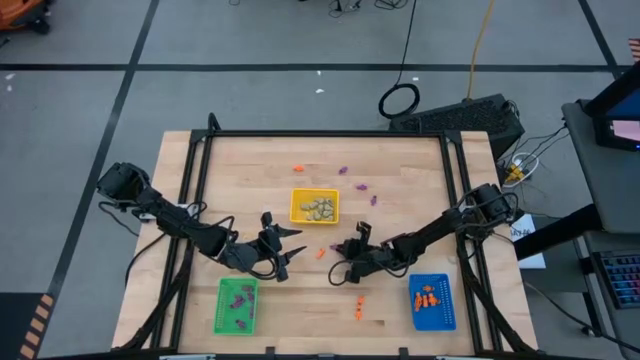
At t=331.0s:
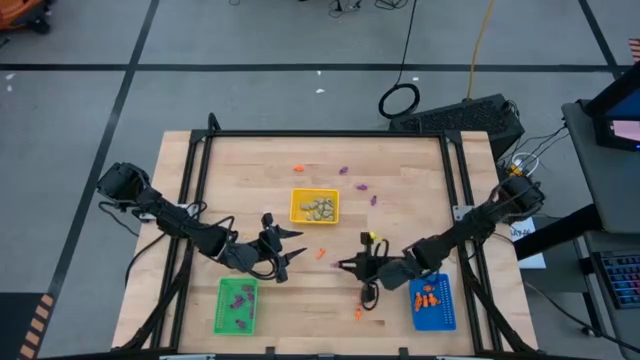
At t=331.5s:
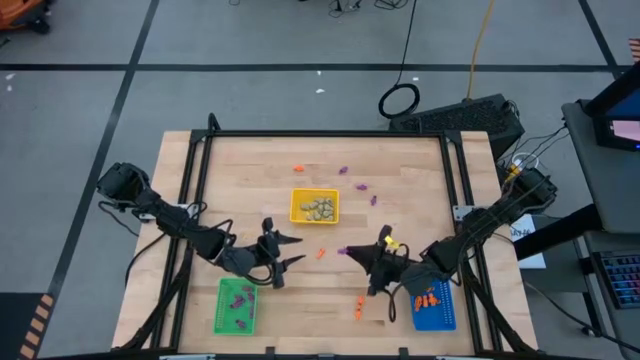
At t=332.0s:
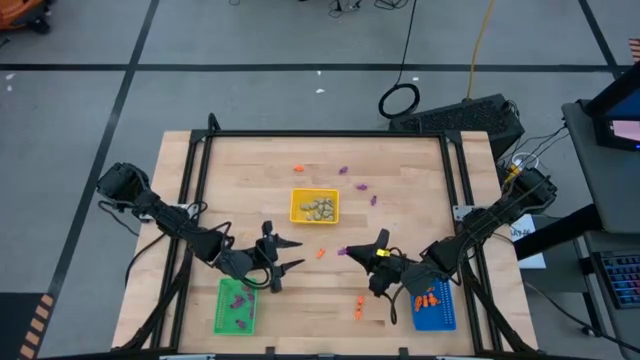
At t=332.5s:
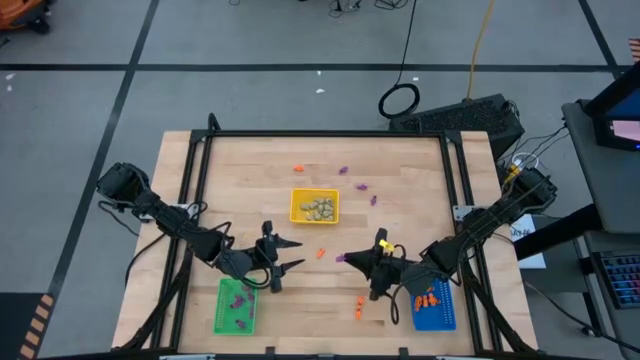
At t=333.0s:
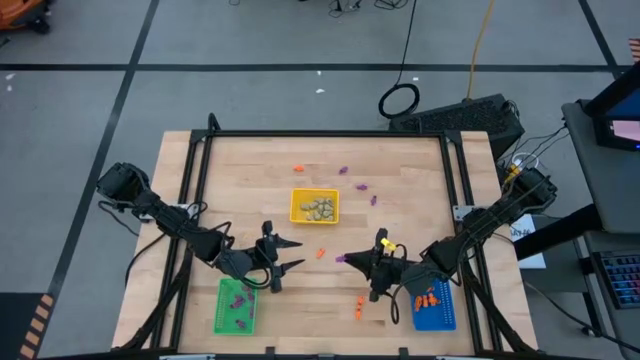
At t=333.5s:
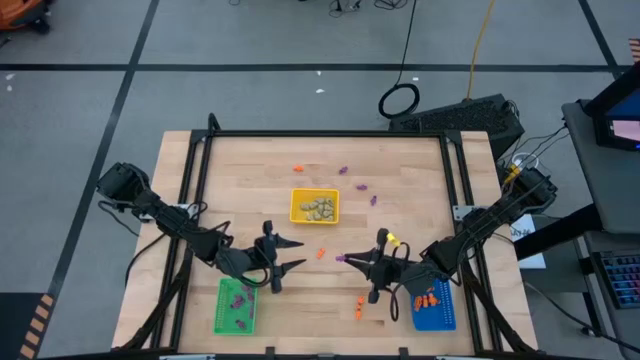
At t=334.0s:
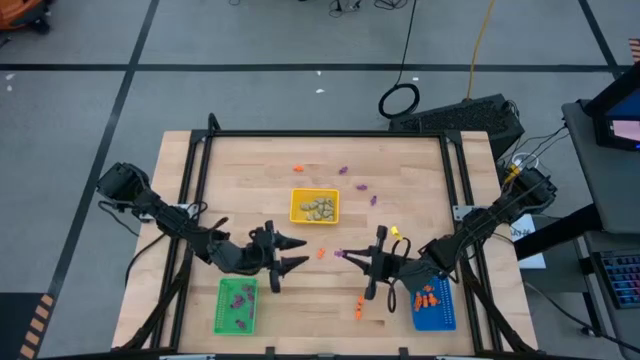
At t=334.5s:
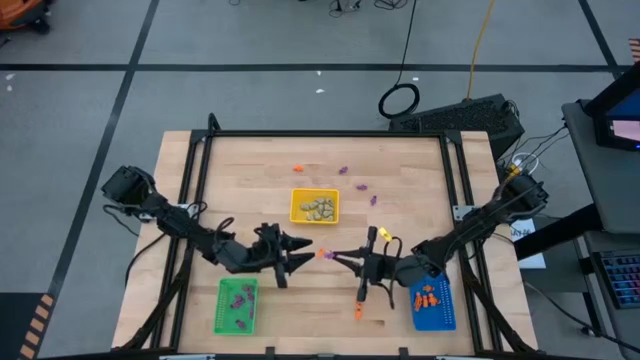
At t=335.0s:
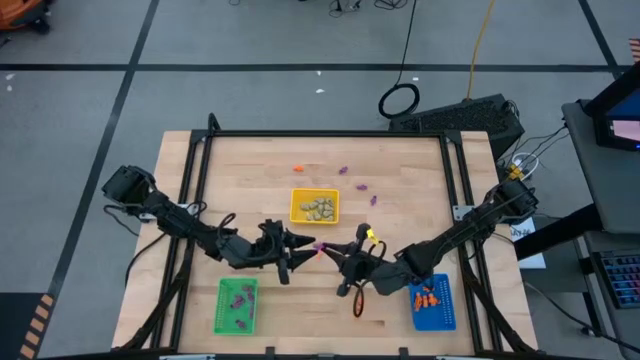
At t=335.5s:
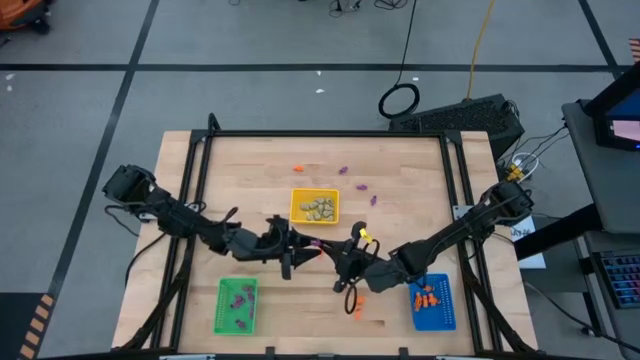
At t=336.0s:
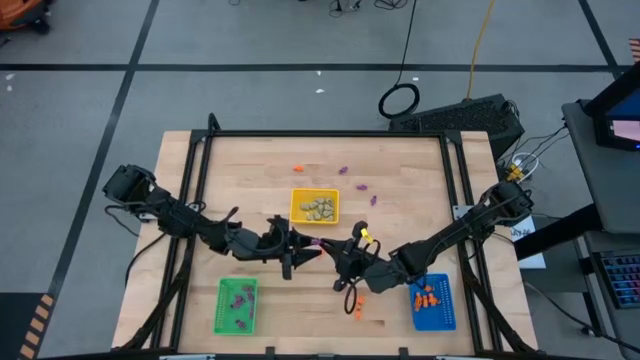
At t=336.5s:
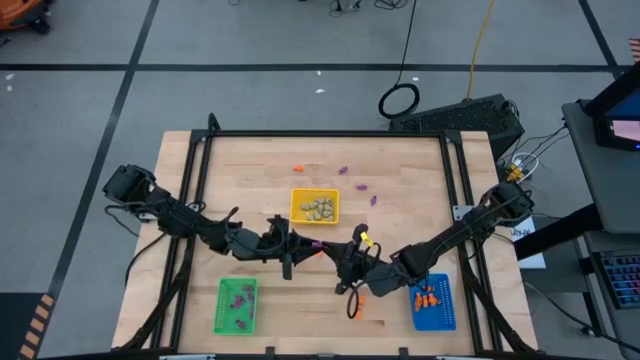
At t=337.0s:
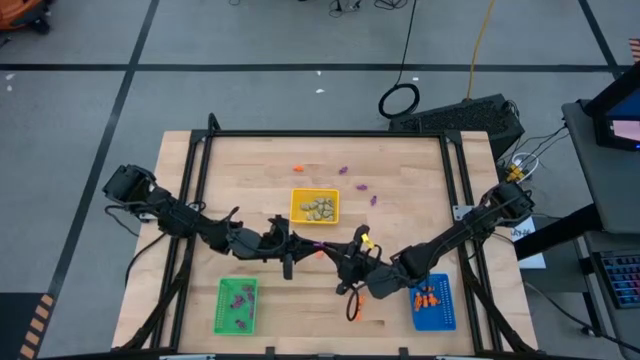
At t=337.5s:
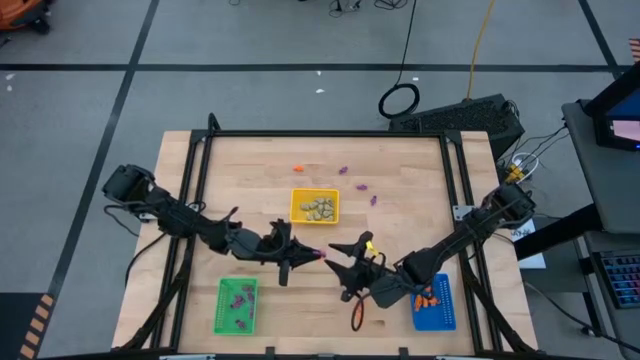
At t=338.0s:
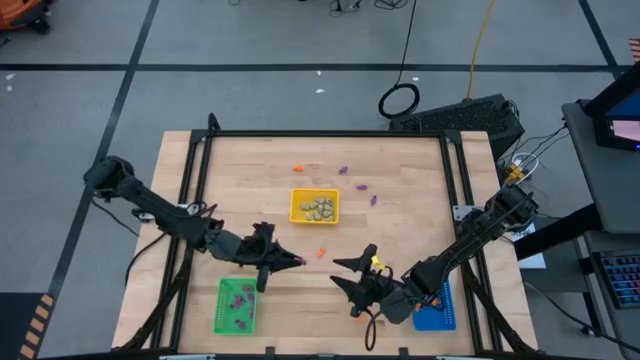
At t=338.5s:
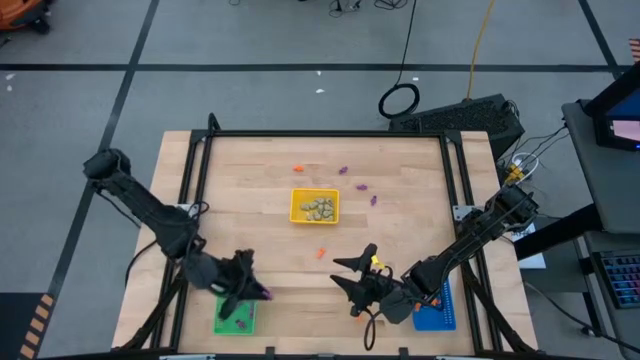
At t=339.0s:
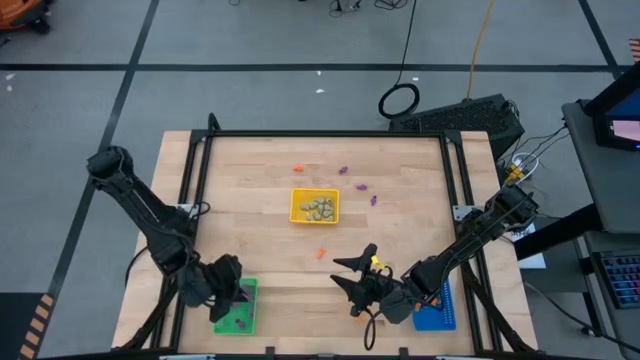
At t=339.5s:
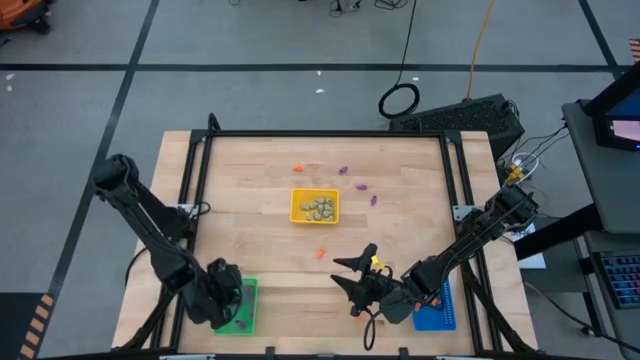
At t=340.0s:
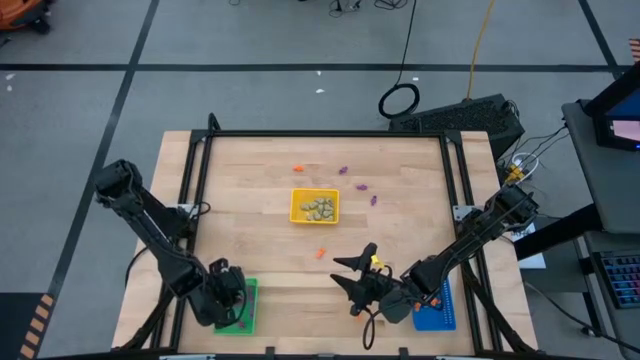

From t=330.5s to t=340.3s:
Task: Sort Halloween decoration
Put the purple skeleton toy in the green basket

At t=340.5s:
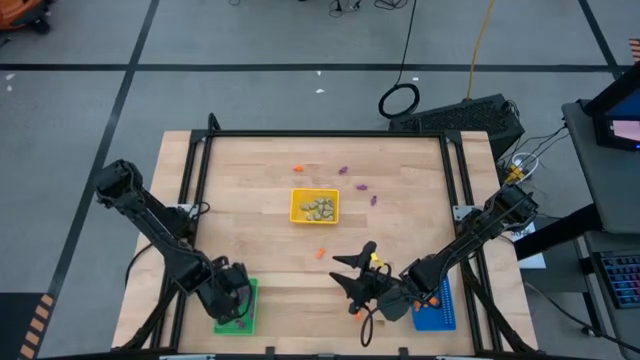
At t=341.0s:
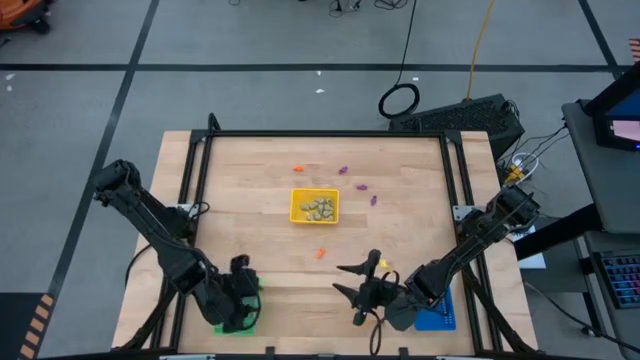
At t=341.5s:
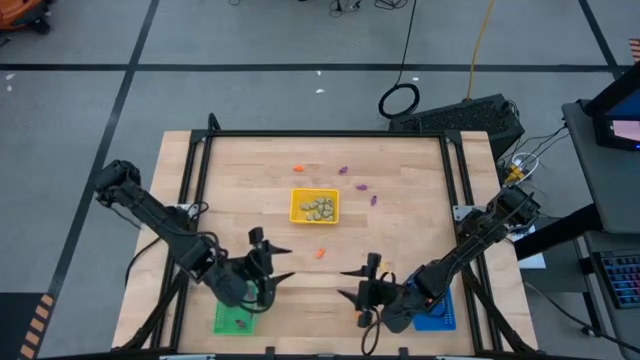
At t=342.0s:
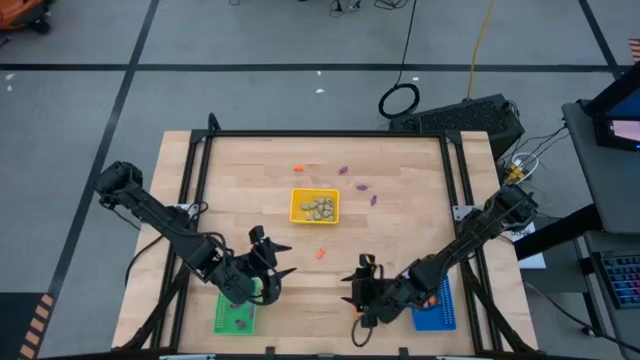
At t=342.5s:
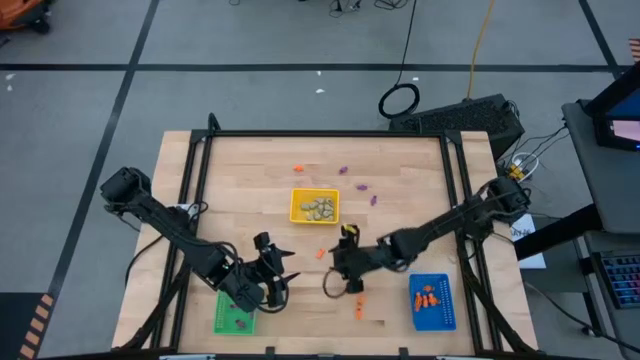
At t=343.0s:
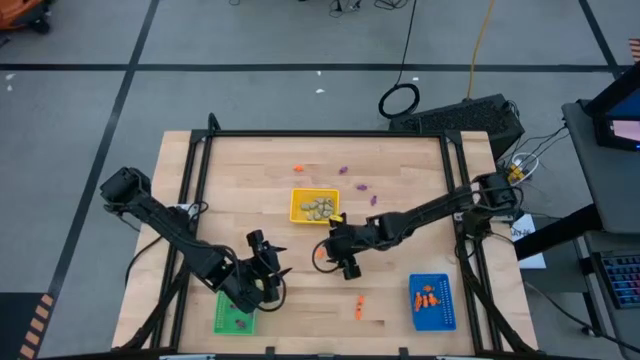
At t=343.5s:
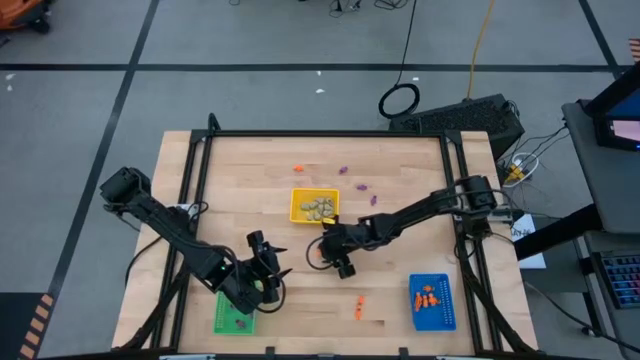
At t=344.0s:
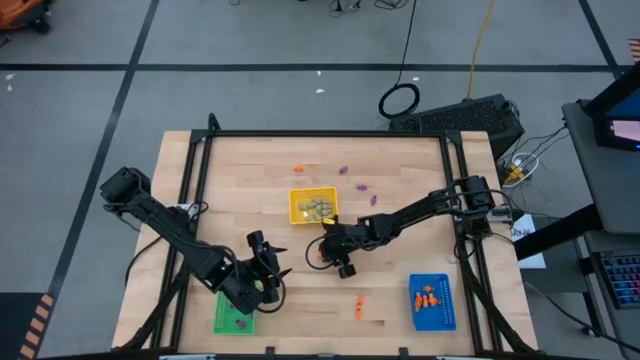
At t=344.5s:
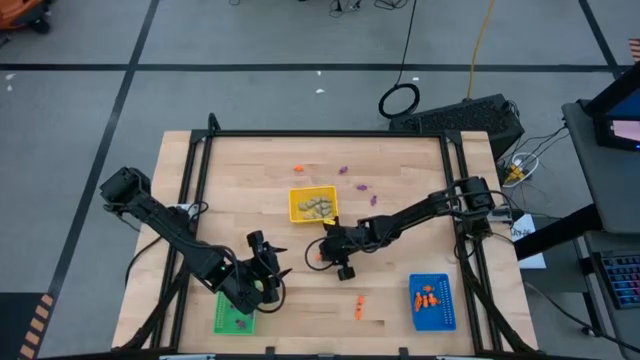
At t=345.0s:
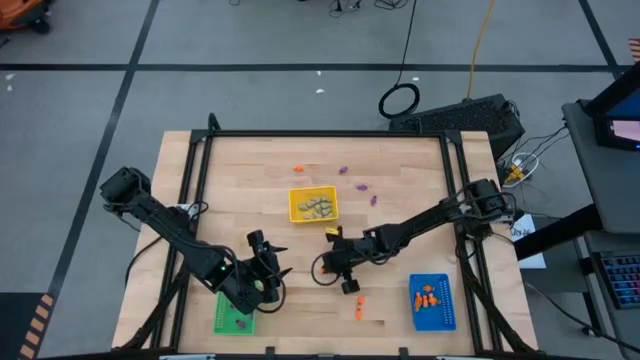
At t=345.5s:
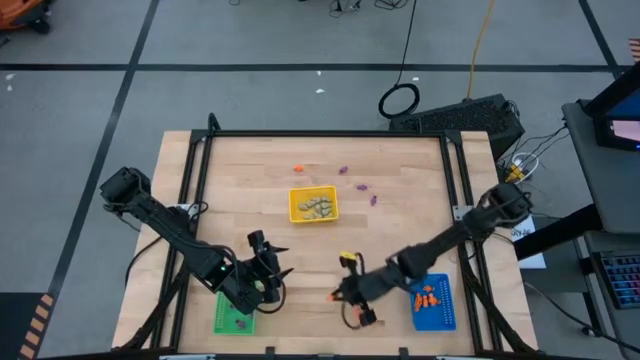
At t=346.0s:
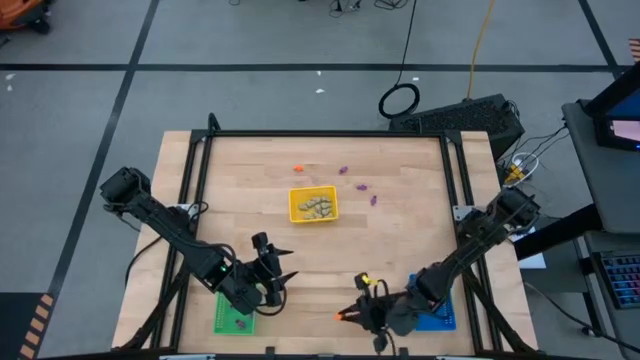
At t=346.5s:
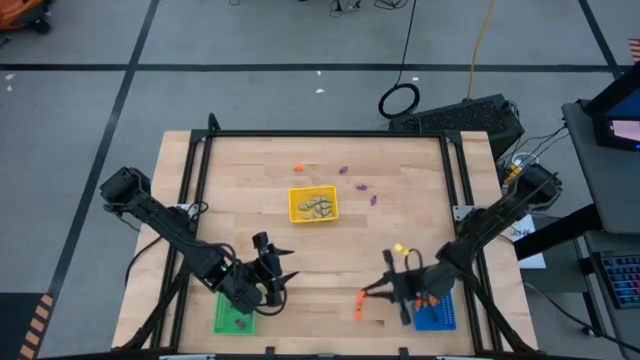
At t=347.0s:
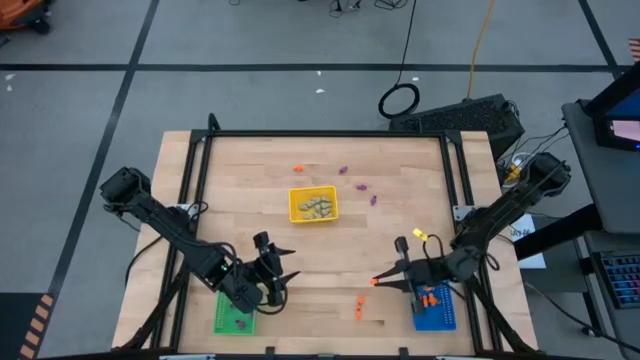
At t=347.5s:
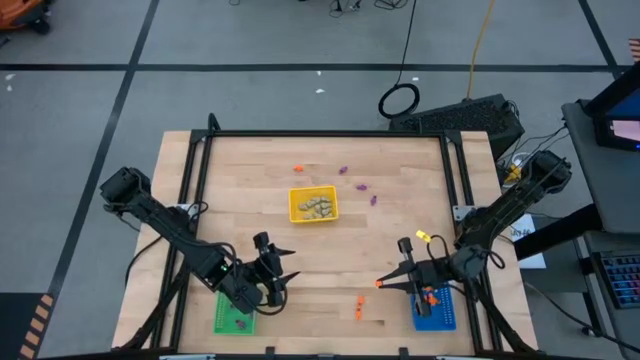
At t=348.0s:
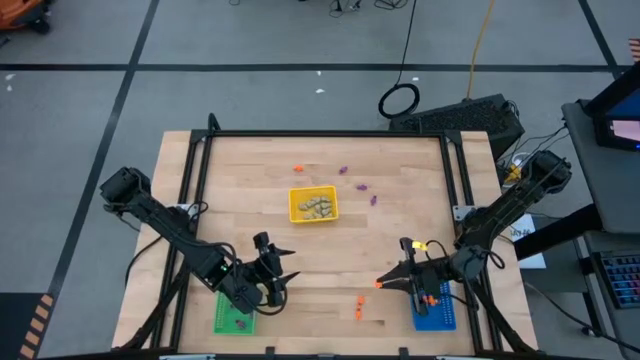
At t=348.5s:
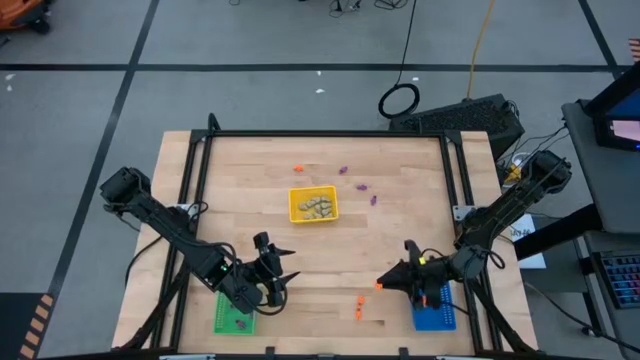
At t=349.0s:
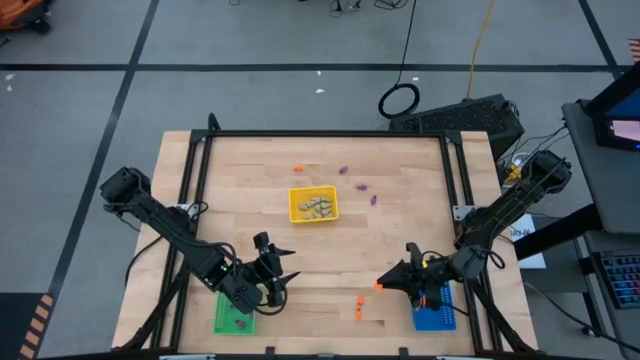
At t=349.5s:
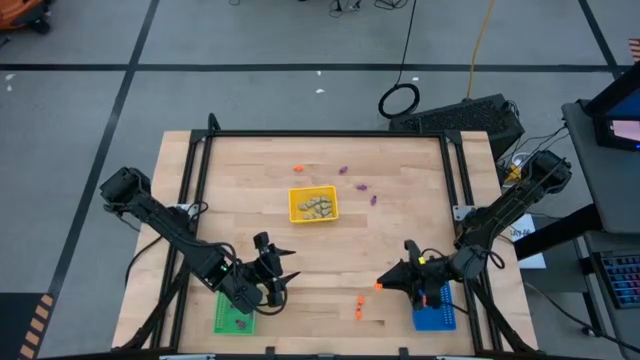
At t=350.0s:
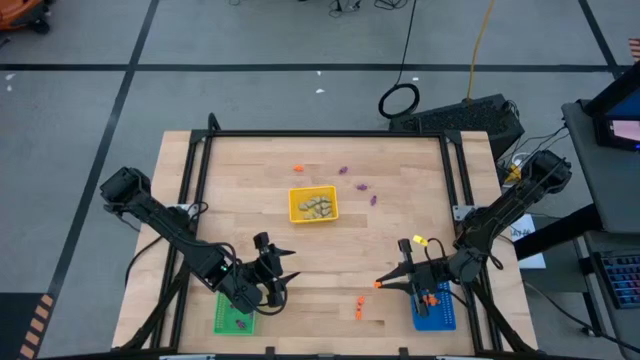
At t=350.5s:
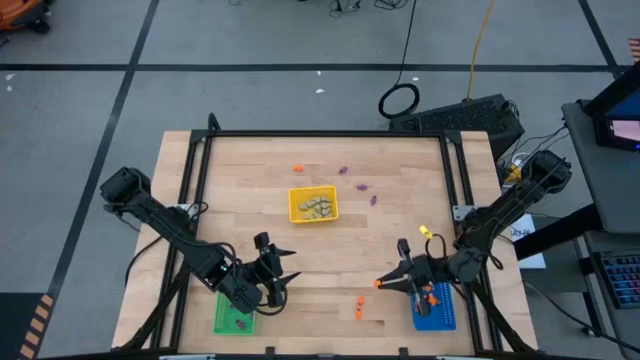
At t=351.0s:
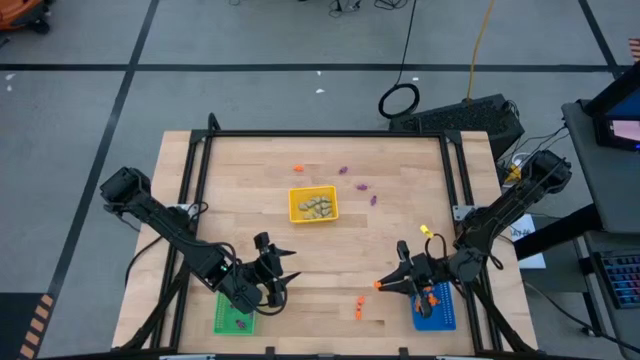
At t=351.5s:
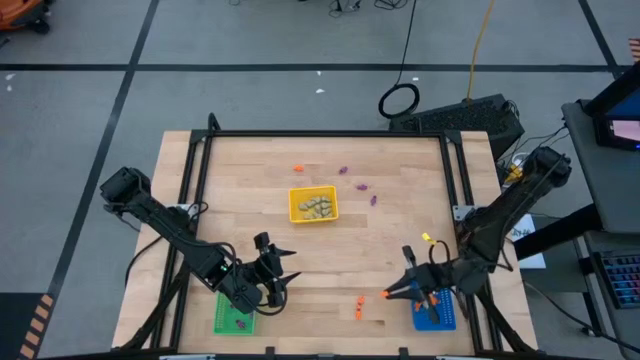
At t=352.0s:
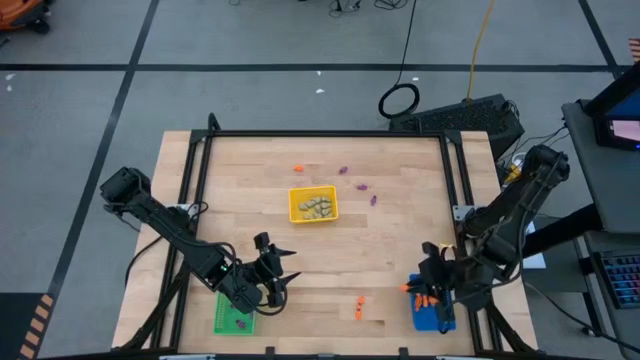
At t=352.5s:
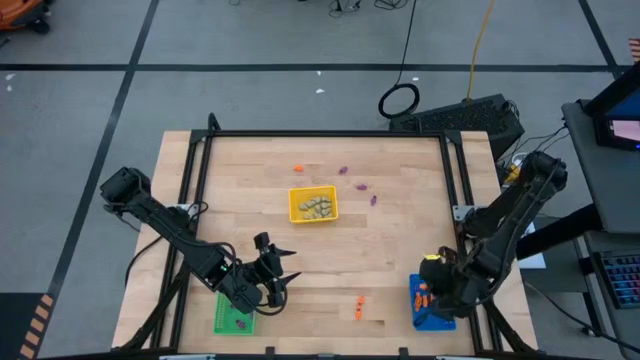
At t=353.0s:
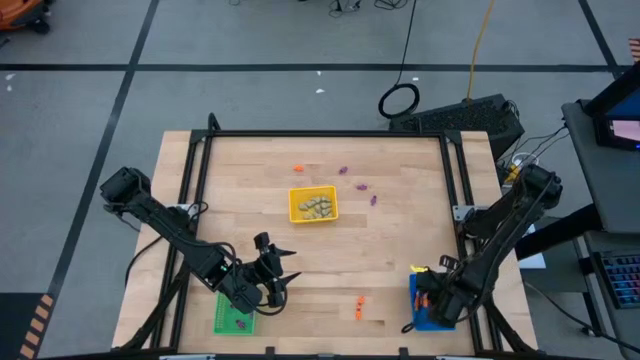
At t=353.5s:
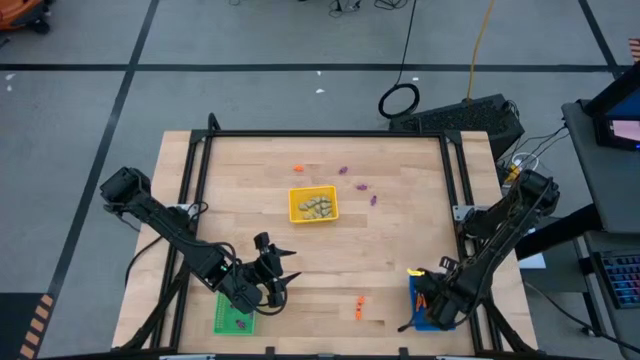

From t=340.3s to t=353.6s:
Put the orange skeleton toy in the blue basket
